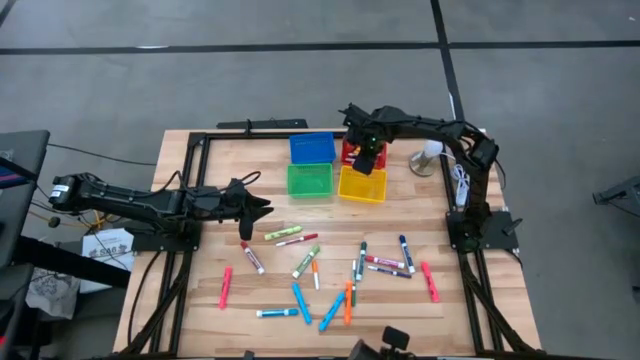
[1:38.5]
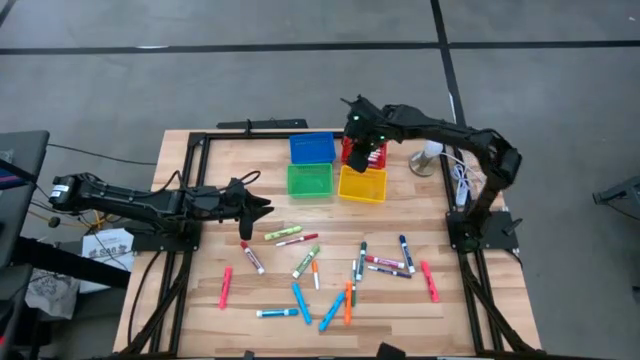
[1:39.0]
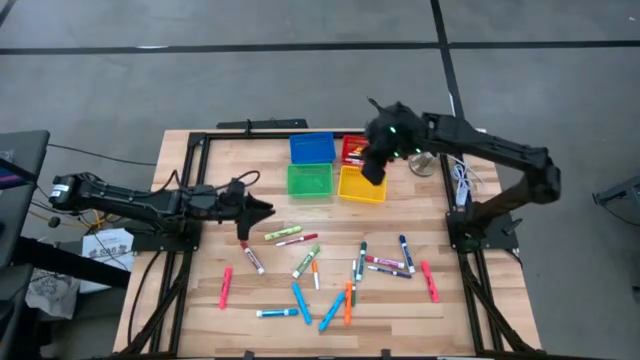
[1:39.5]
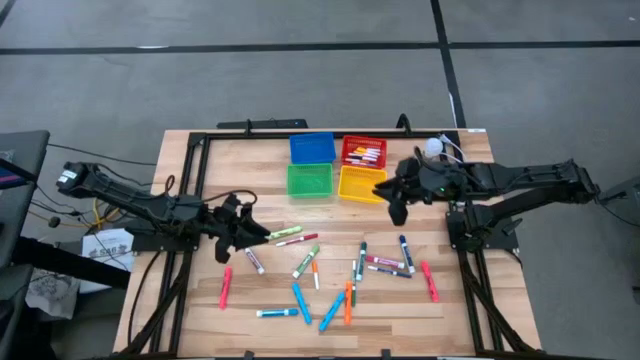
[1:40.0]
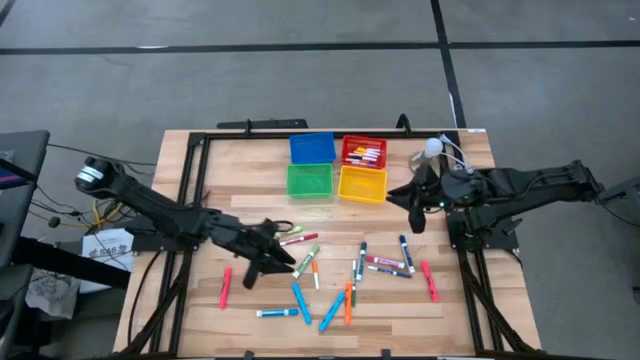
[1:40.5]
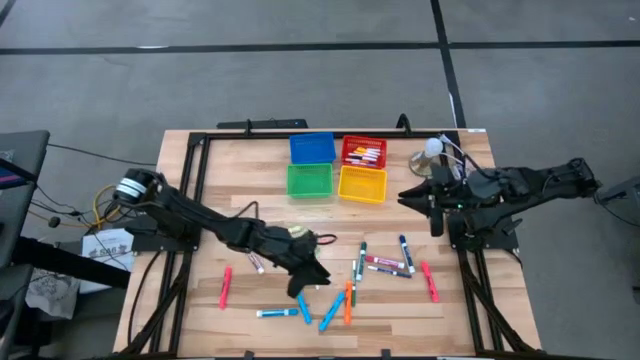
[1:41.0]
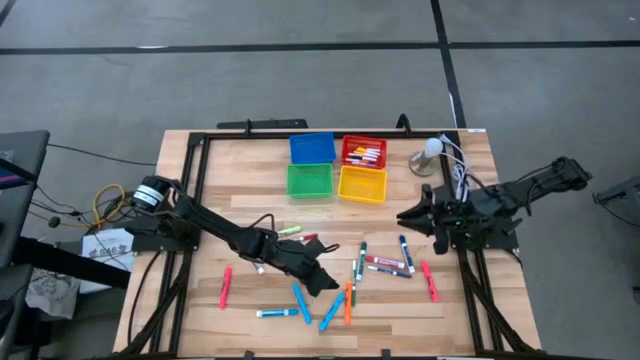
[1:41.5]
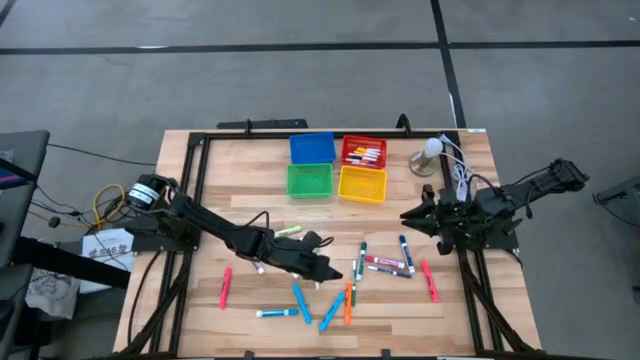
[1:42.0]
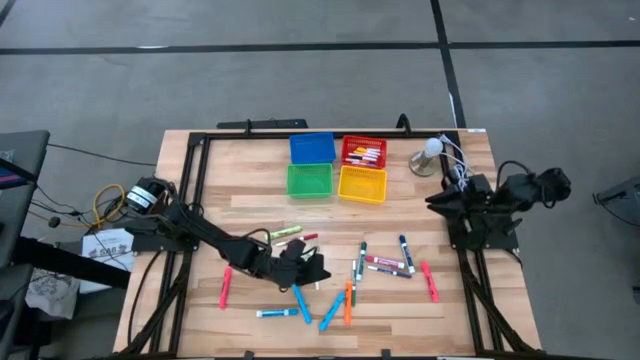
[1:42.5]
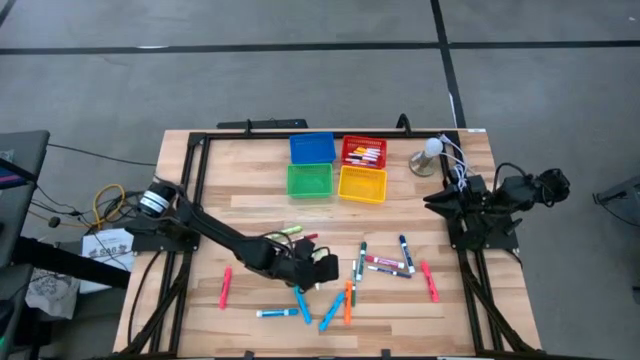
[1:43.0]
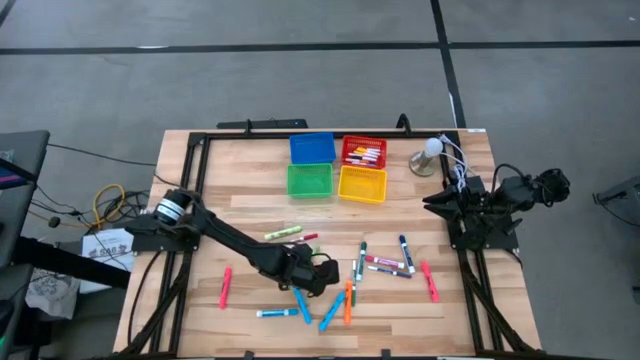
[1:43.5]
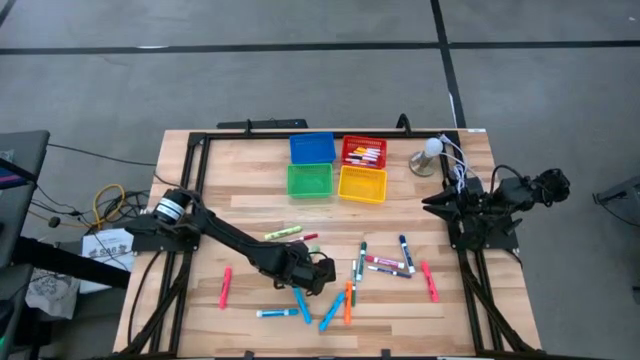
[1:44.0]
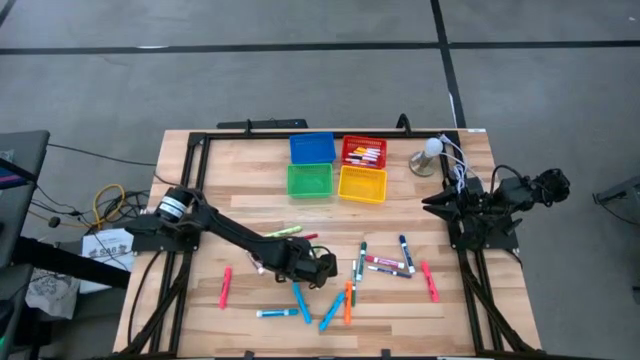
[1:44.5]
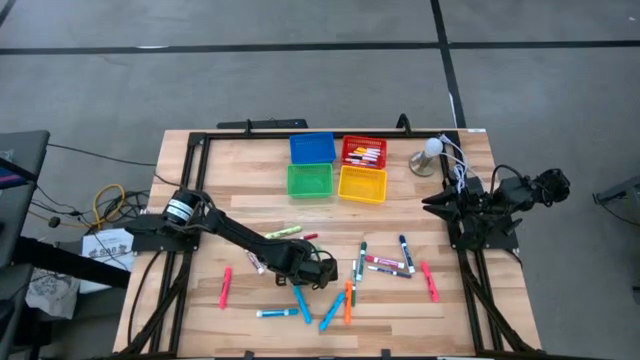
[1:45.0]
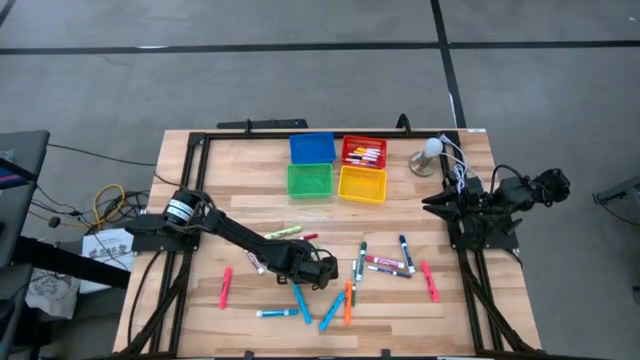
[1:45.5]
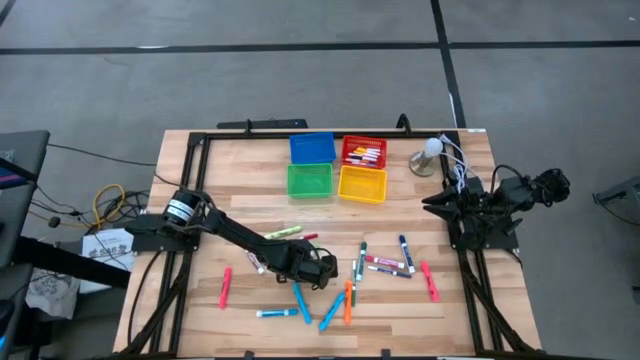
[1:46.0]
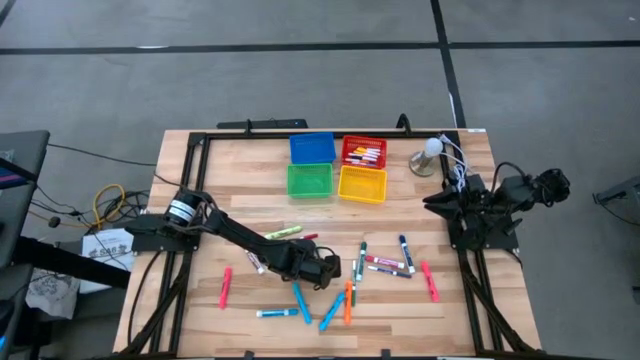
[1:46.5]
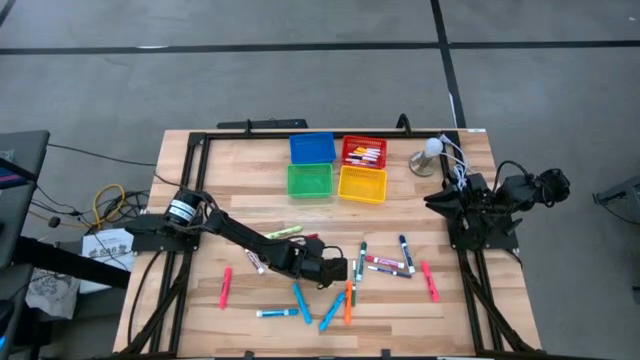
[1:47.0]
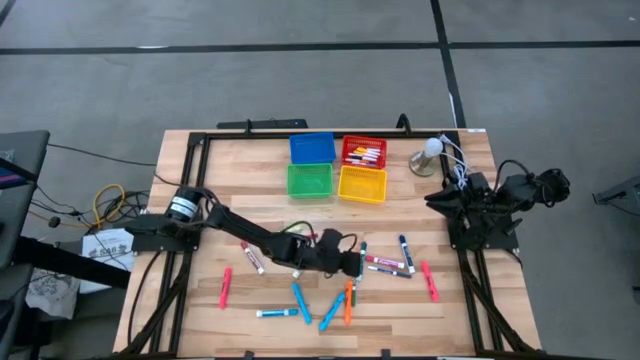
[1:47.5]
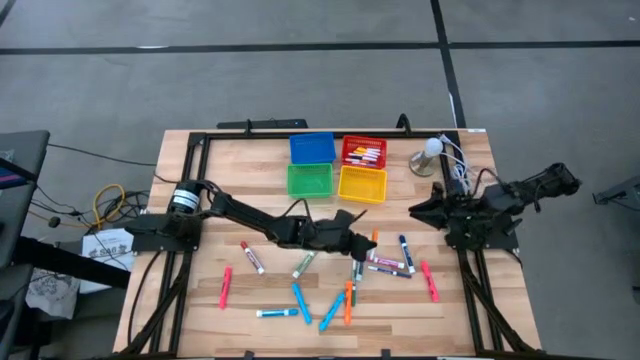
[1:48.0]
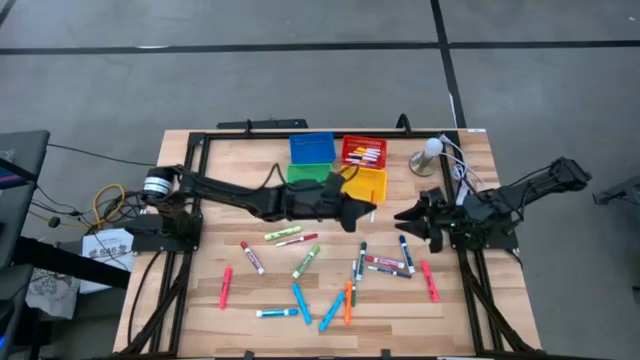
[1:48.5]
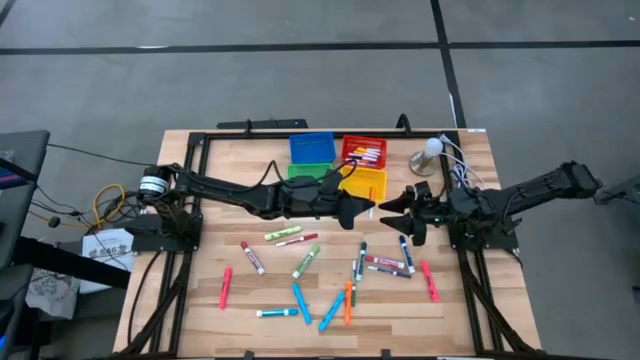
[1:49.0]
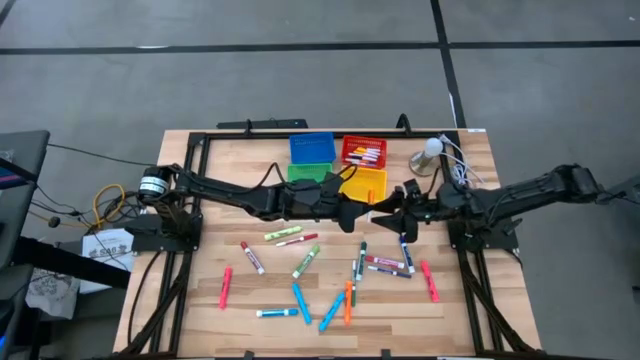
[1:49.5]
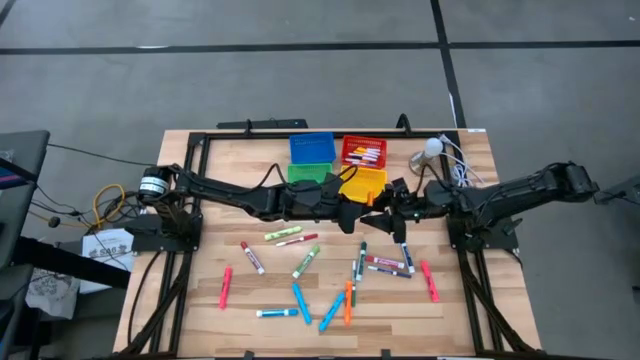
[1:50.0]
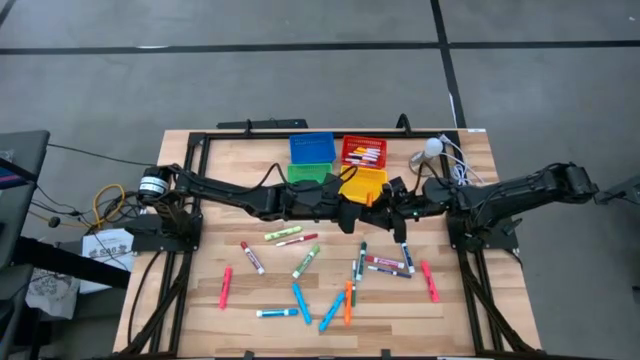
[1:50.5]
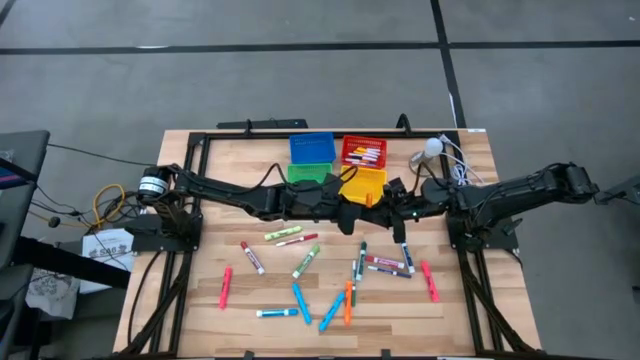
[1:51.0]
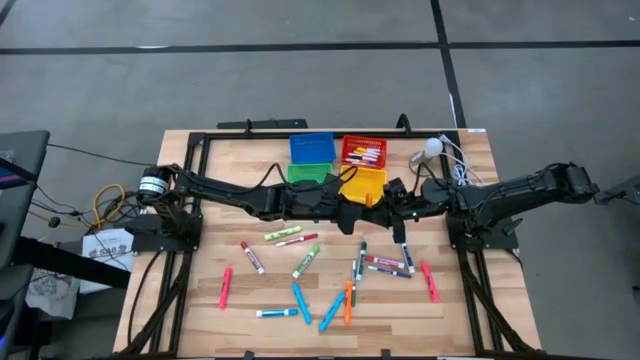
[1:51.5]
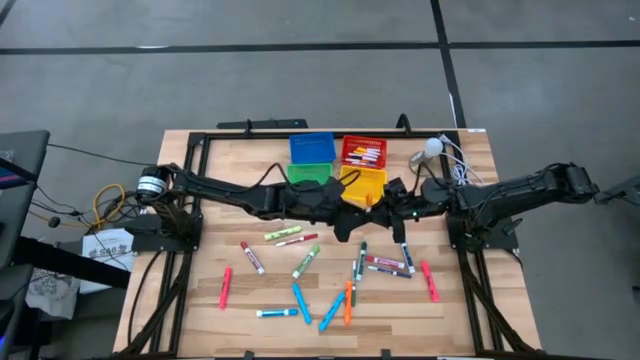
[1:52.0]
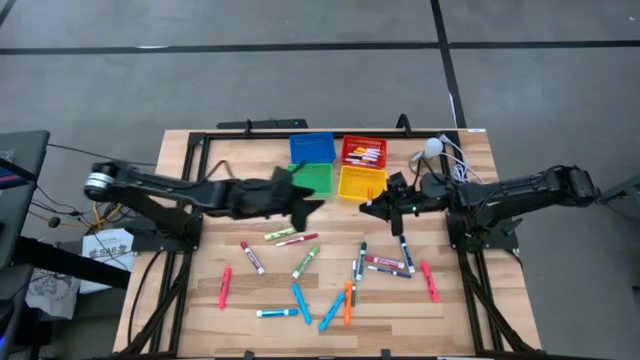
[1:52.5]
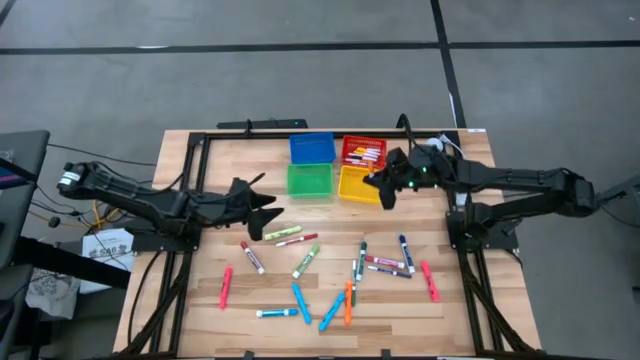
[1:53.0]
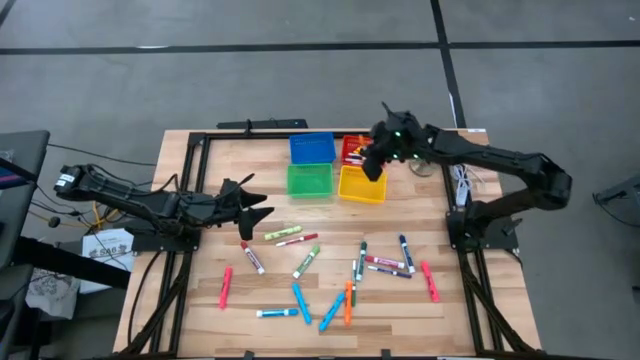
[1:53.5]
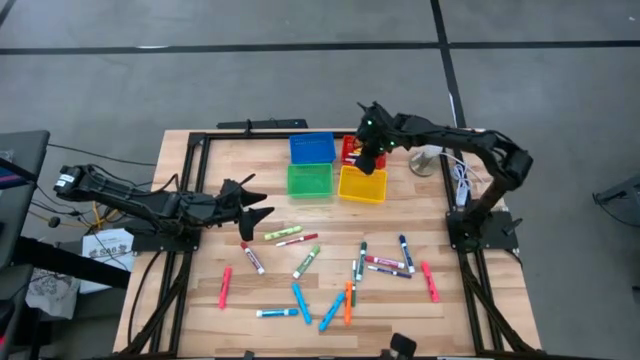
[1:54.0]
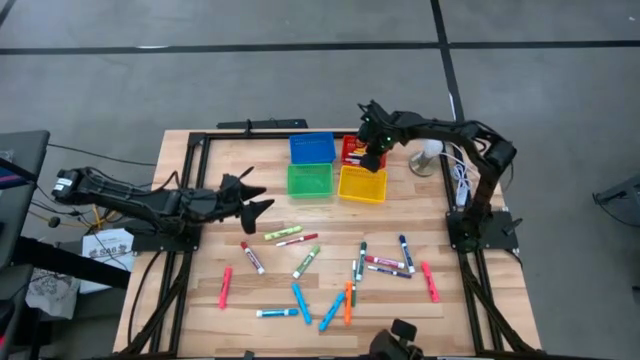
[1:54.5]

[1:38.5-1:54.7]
Task: Pick & Place Markers
Put the orange highlighter into the red bin

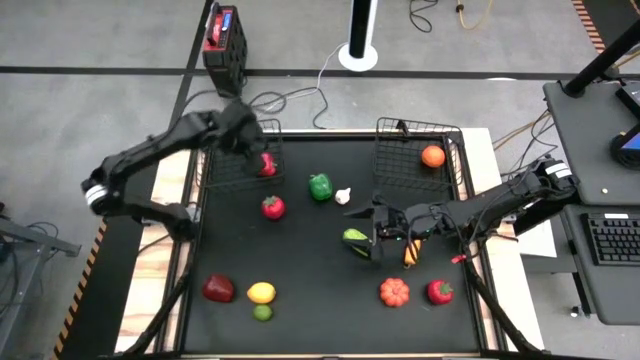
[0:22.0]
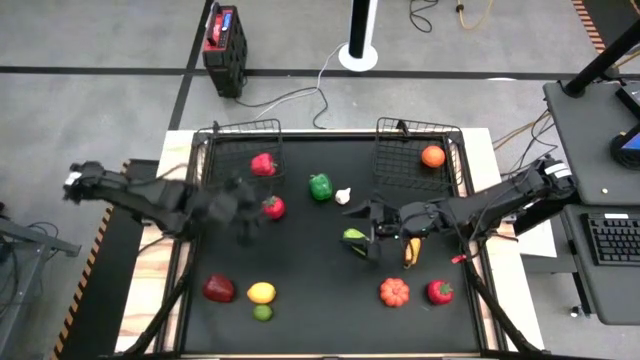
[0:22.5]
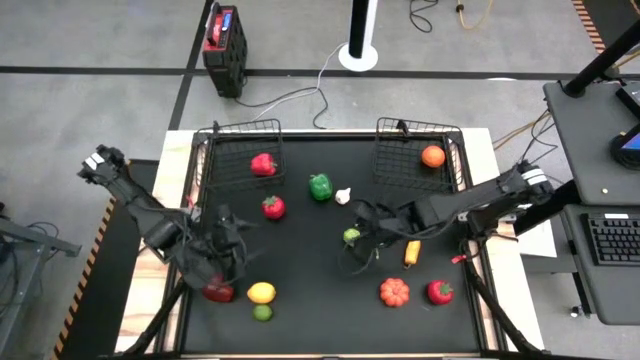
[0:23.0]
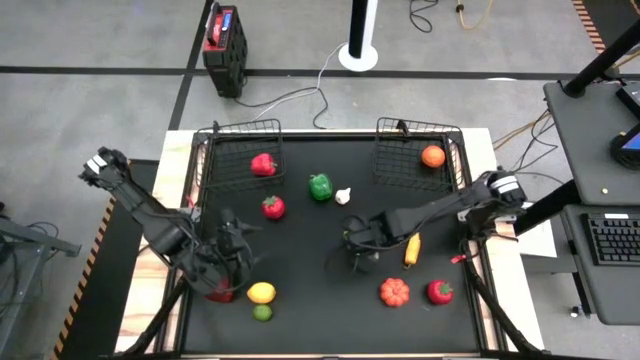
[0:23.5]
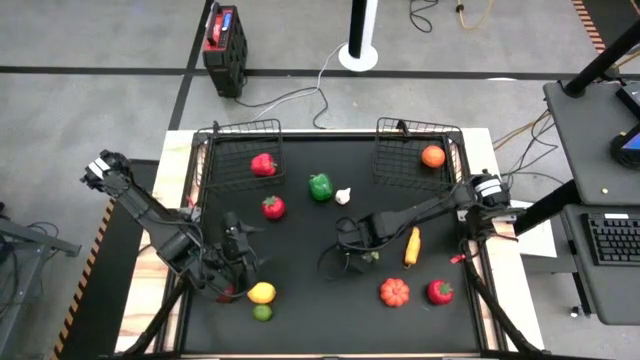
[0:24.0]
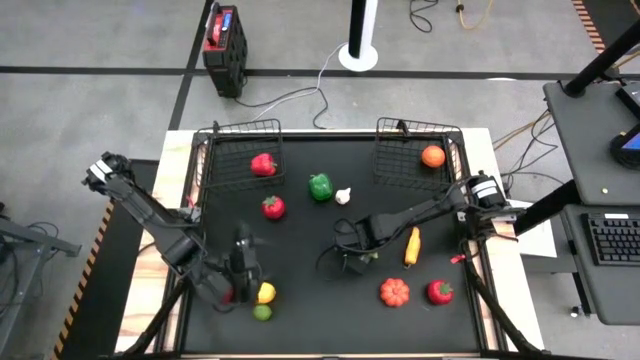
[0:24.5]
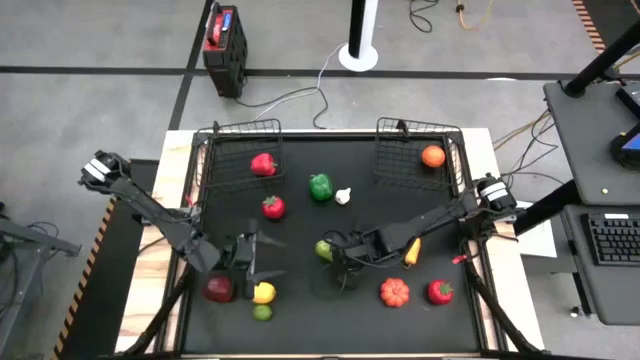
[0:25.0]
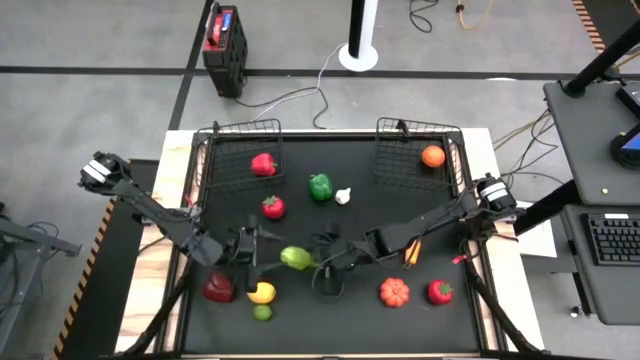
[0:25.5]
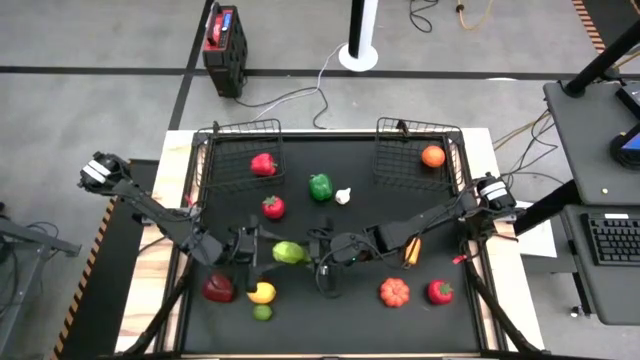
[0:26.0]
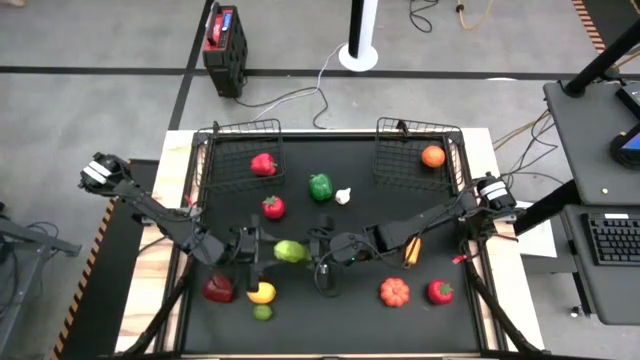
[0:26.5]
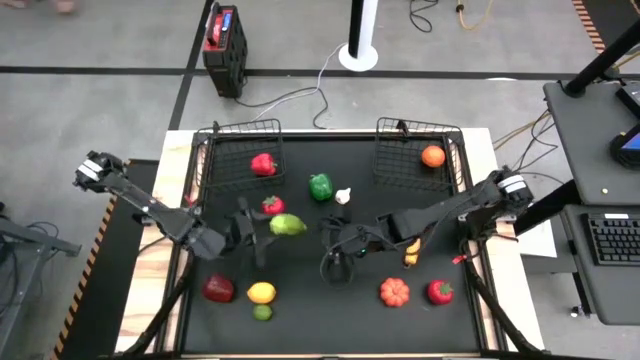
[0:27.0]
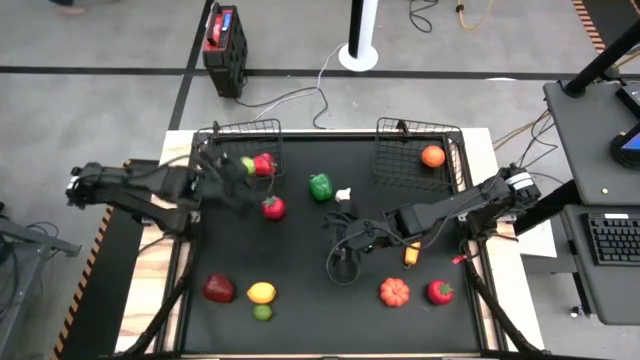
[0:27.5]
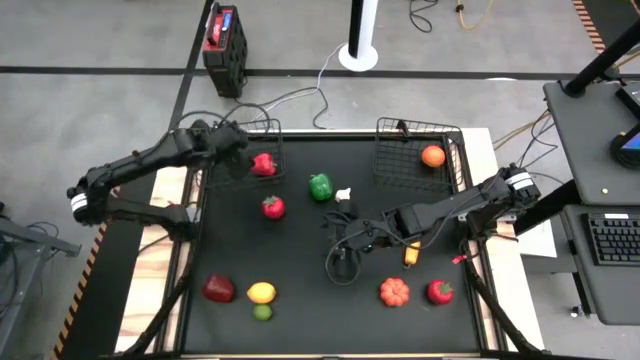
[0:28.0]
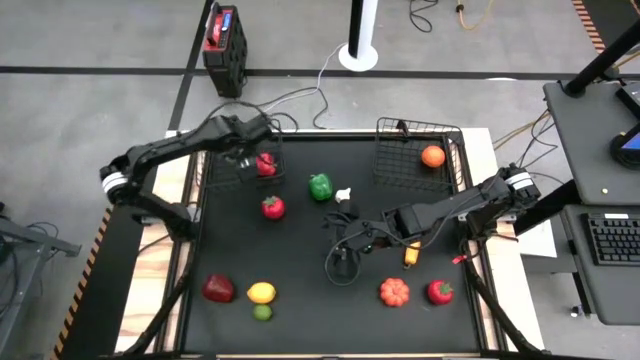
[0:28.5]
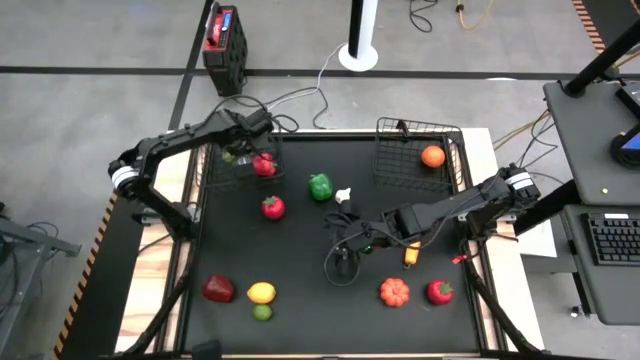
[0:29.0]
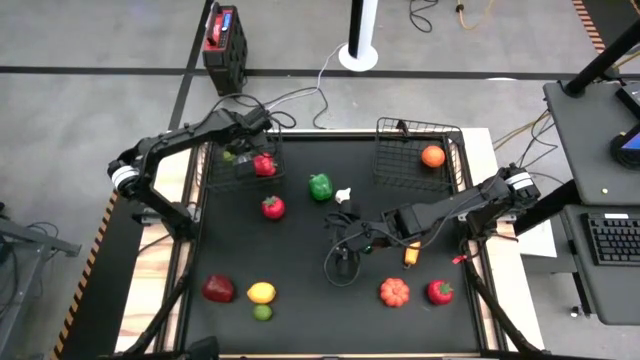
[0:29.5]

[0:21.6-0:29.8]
Task: Sort produce into baskets
Put the cucumber into the left wire basket
